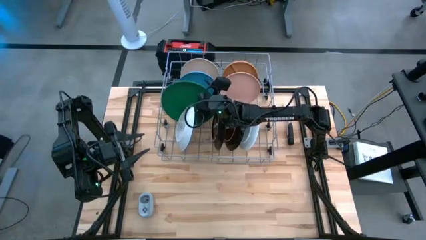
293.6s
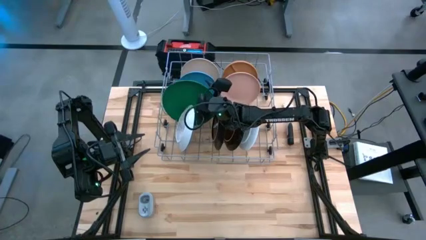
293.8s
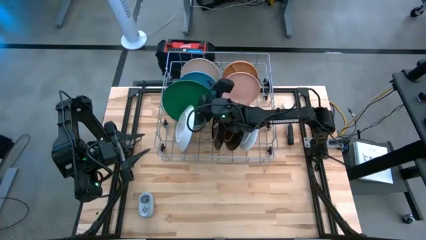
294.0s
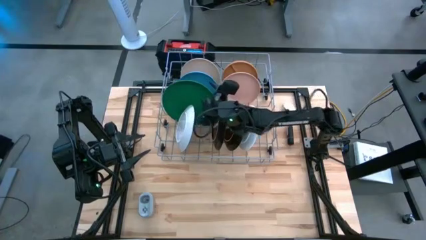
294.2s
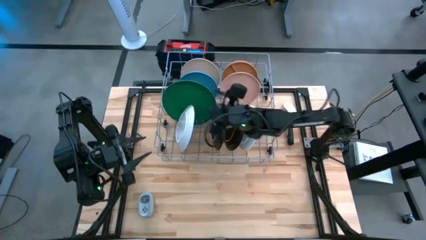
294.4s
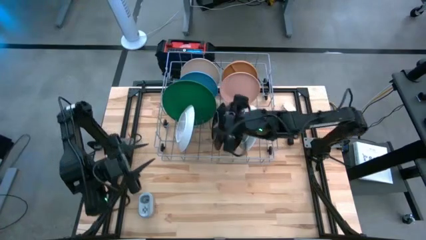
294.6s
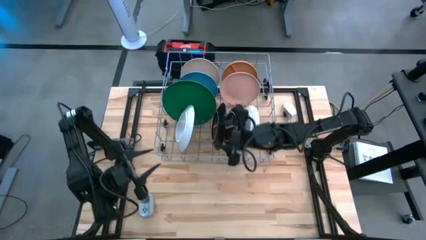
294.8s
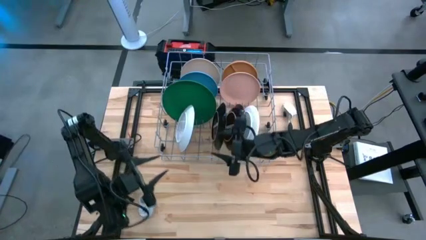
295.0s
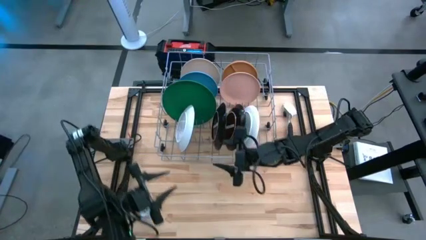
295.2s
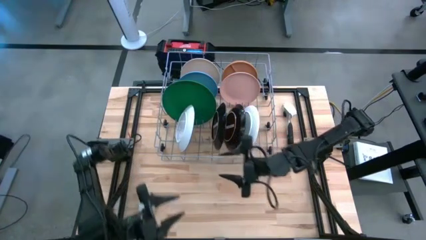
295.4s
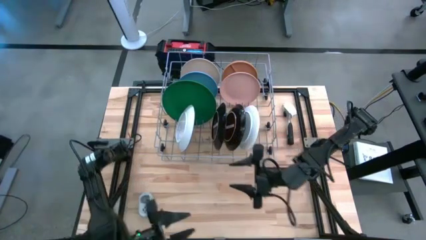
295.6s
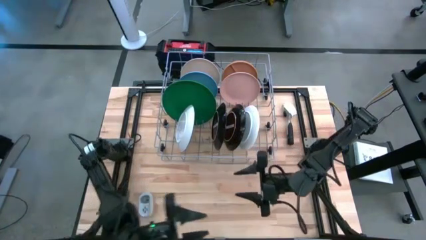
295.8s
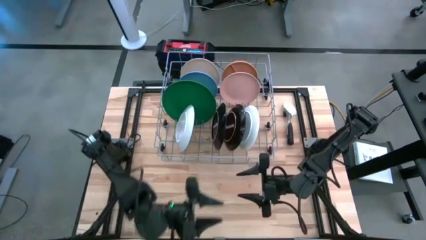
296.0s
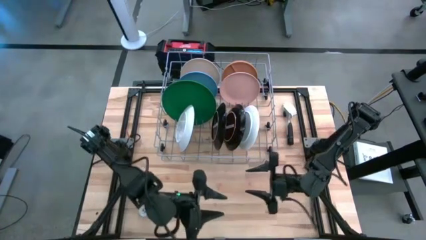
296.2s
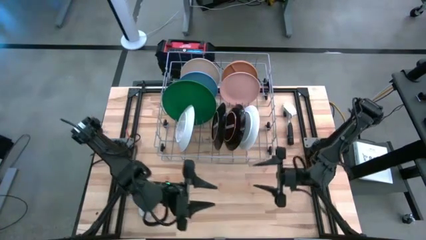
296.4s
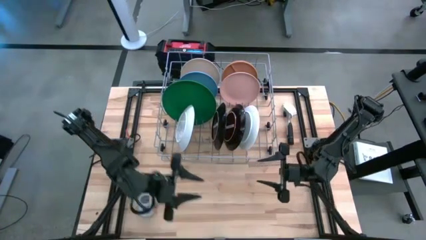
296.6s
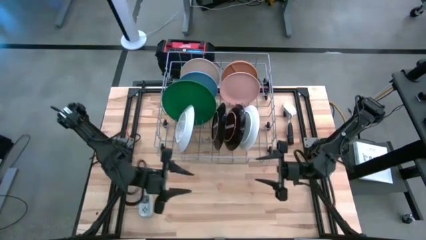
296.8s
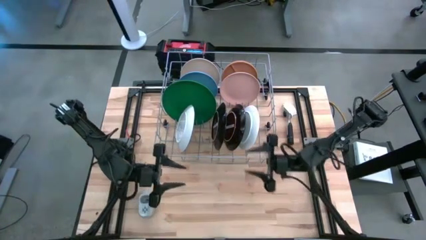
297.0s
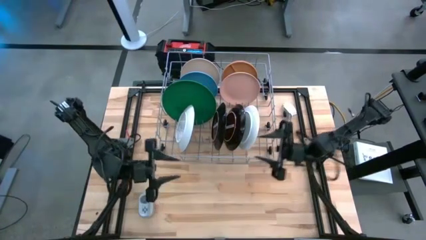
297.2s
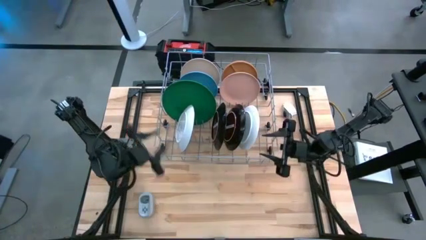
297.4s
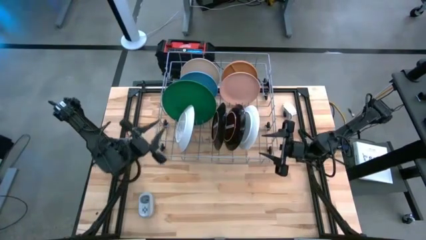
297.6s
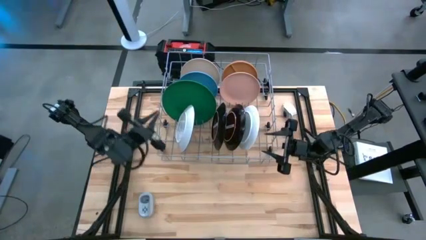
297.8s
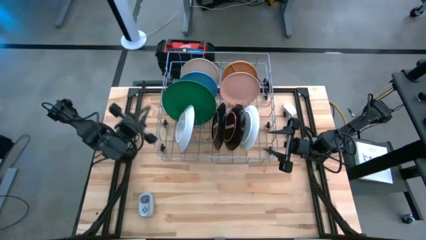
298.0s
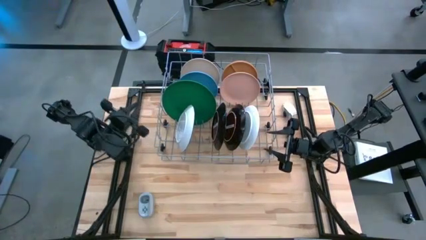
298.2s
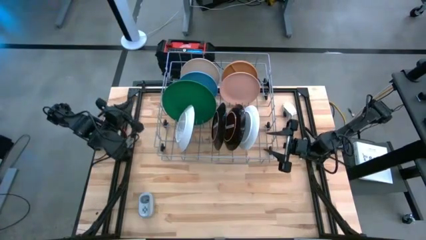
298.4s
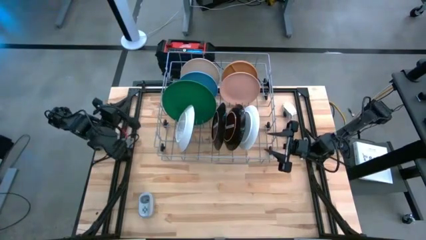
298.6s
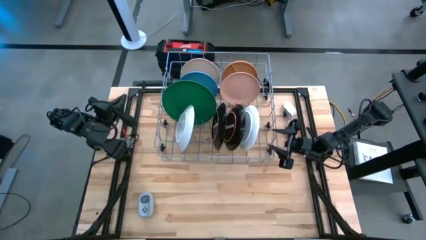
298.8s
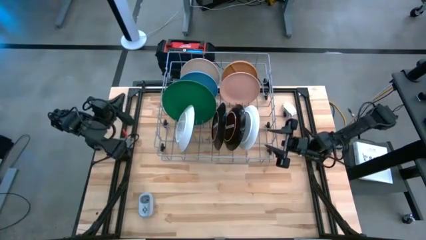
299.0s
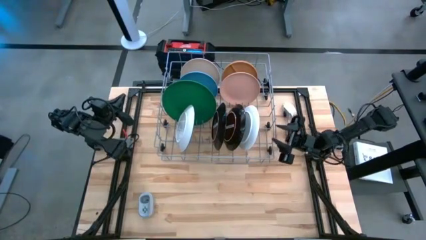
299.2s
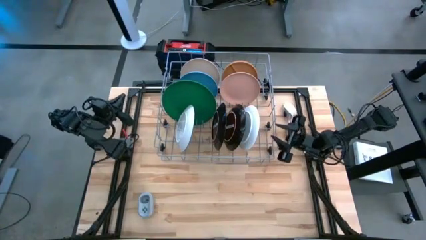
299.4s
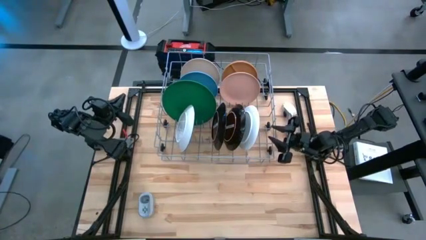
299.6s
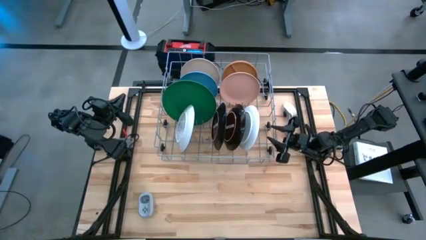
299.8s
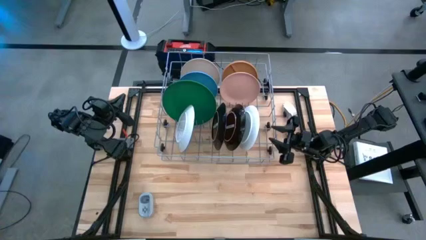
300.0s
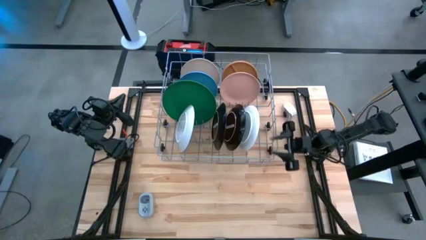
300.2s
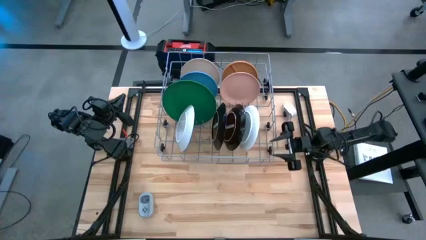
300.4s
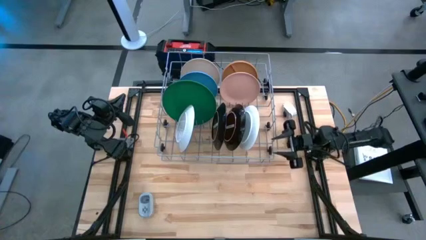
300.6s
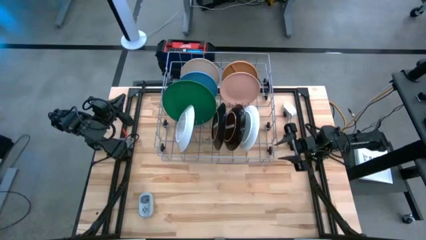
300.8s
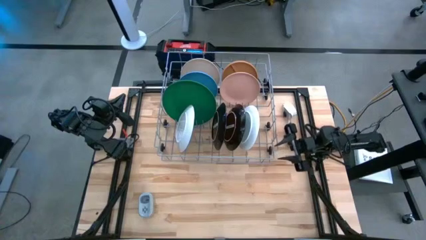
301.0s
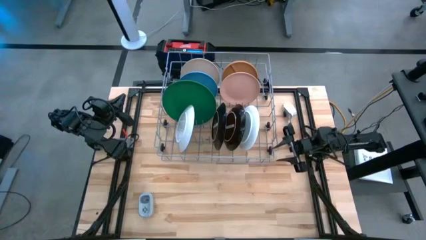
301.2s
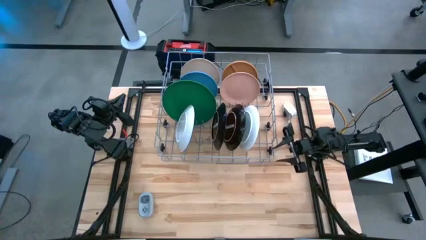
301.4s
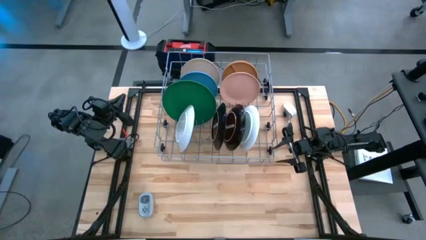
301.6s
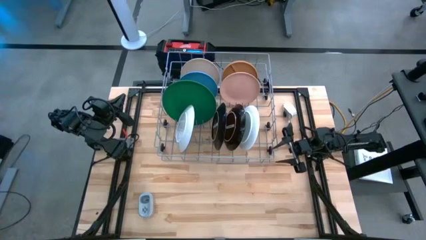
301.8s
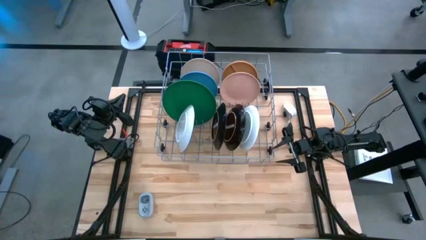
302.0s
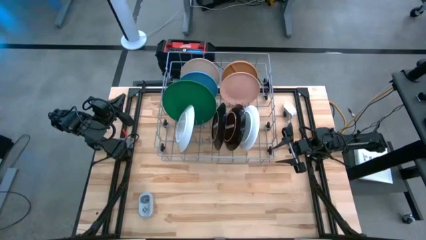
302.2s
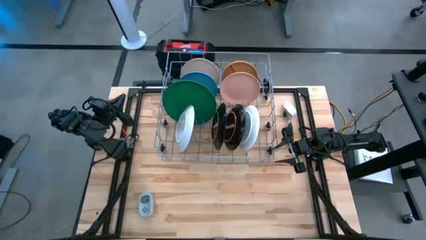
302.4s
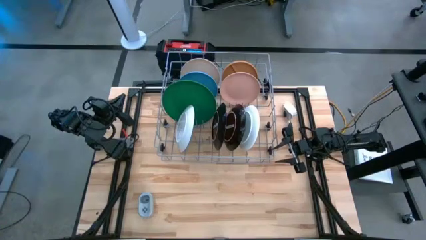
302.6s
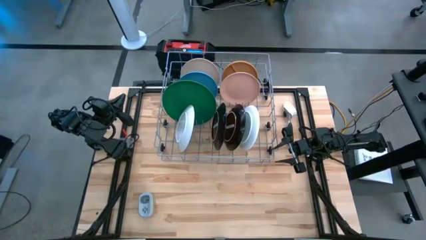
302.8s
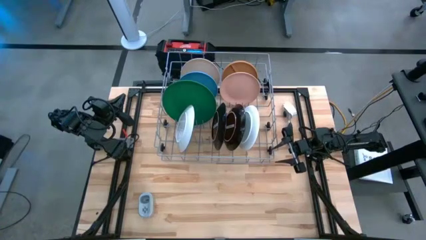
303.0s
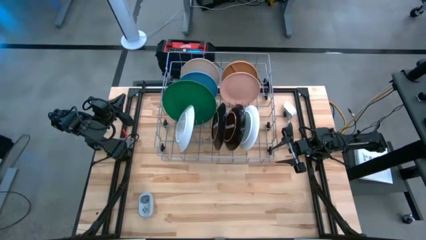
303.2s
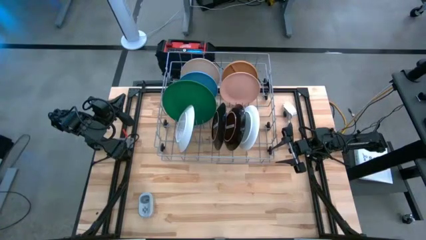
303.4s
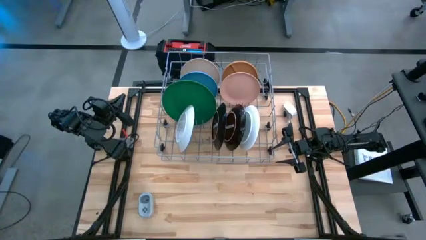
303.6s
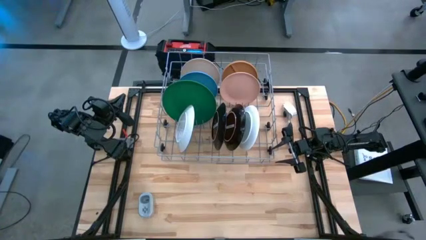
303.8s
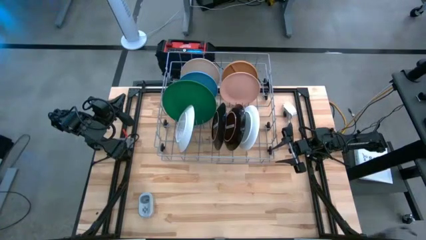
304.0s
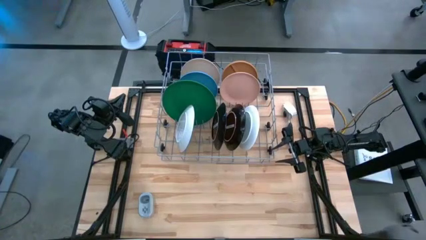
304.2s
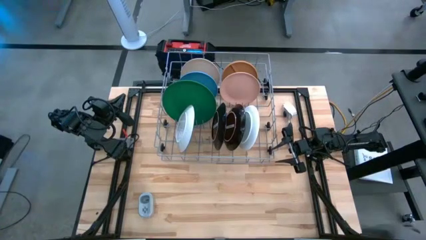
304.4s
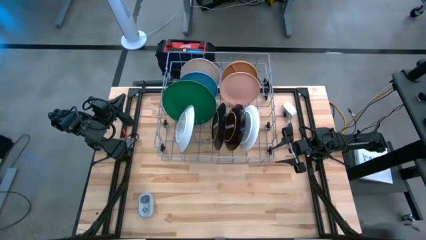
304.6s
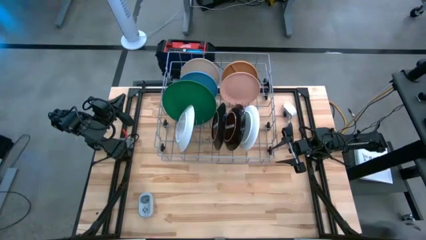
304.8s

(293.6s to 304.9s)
Task: Sort dishes
Return to Home Position
